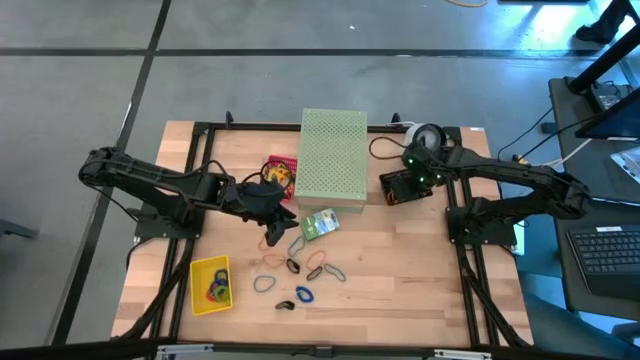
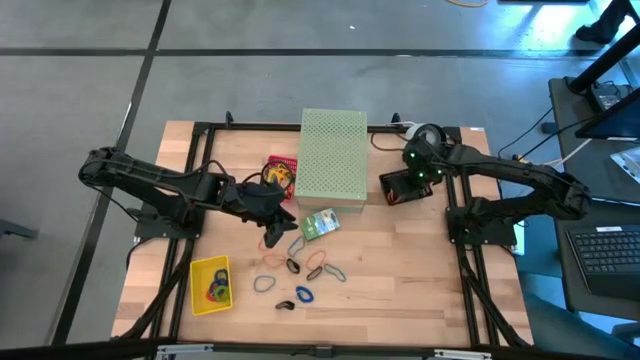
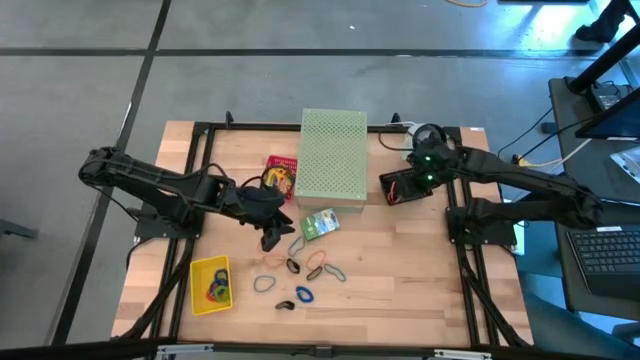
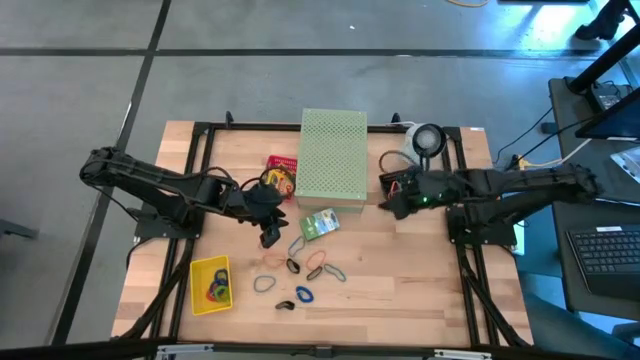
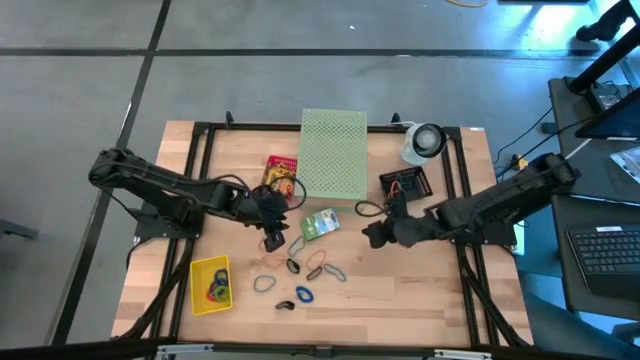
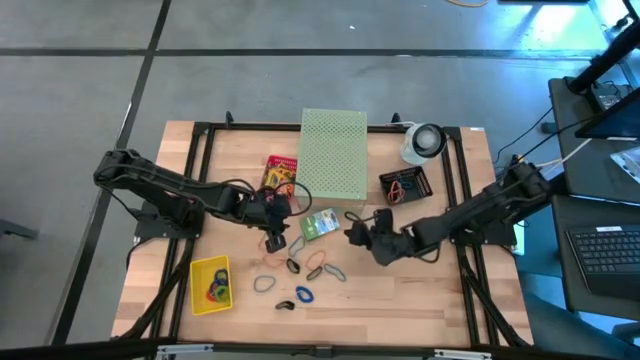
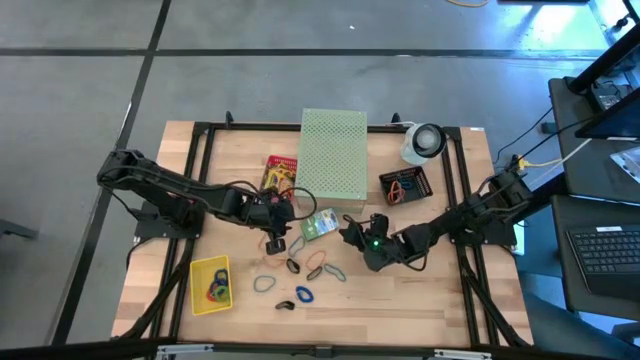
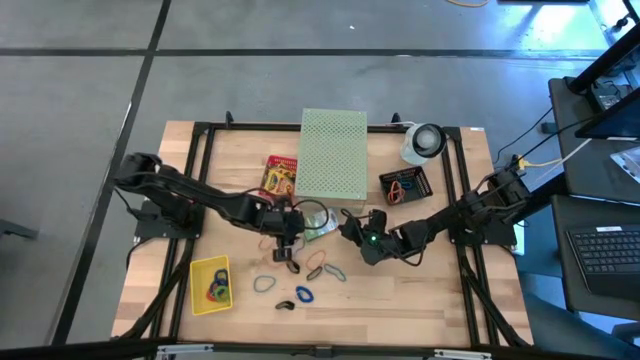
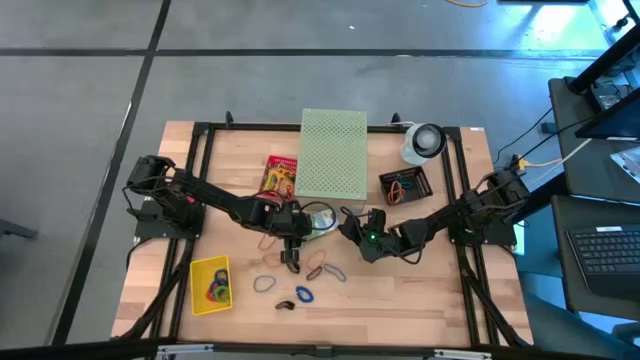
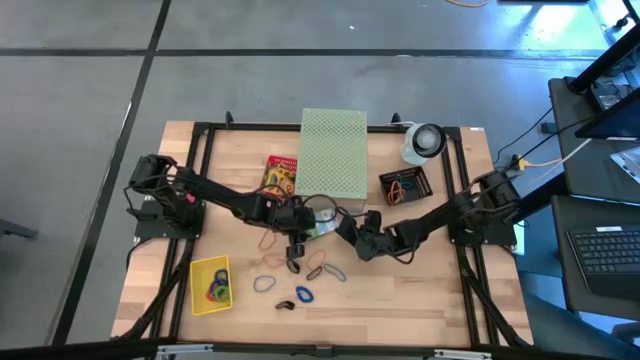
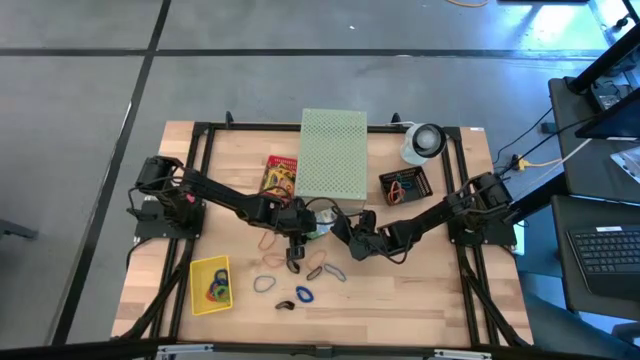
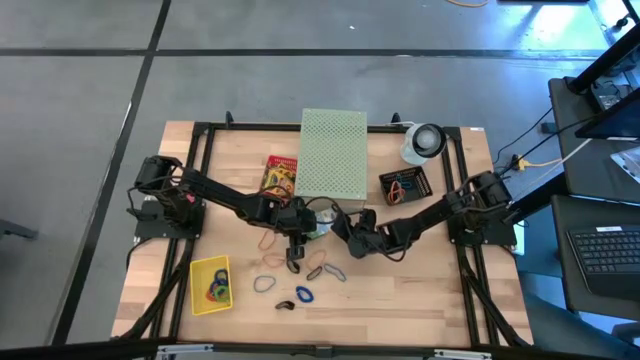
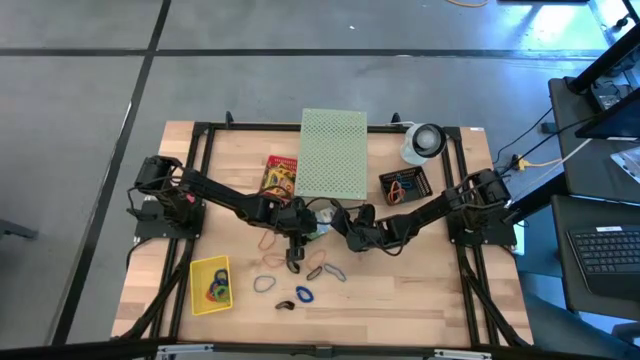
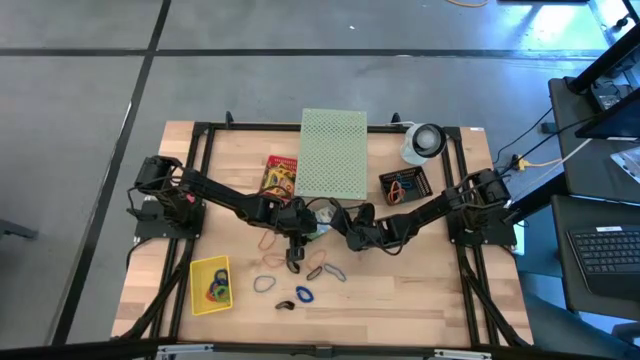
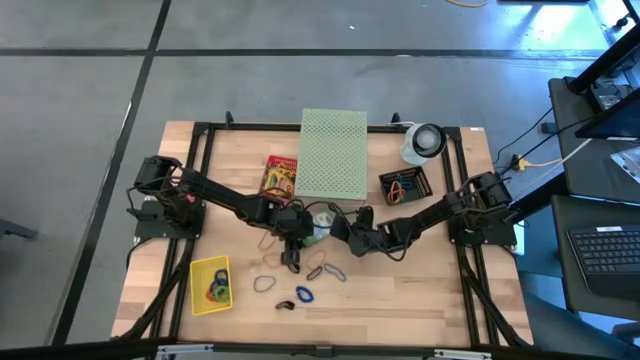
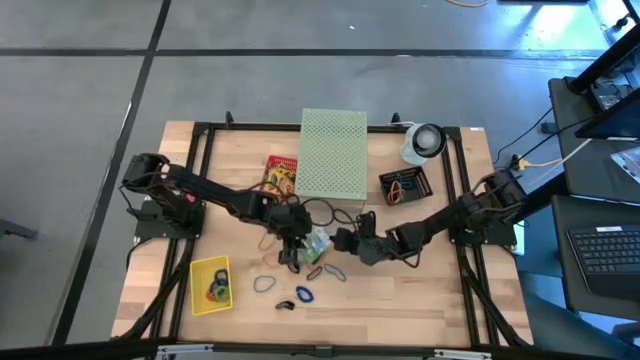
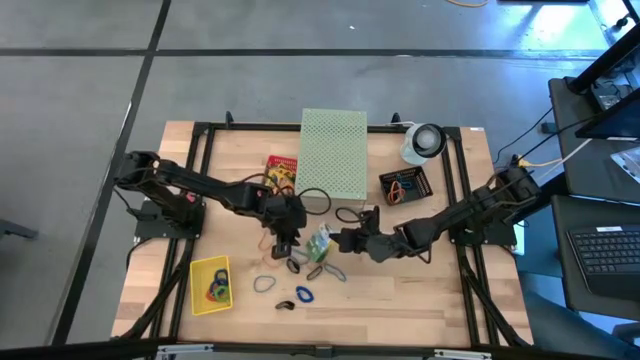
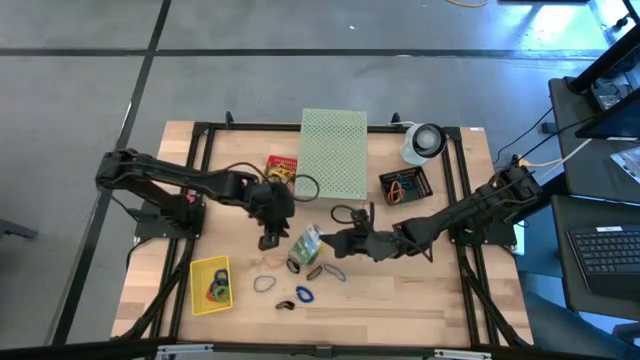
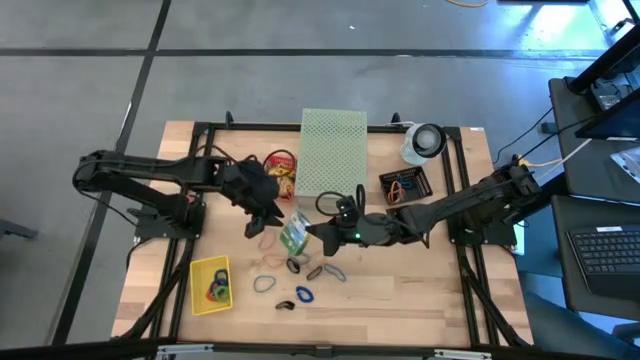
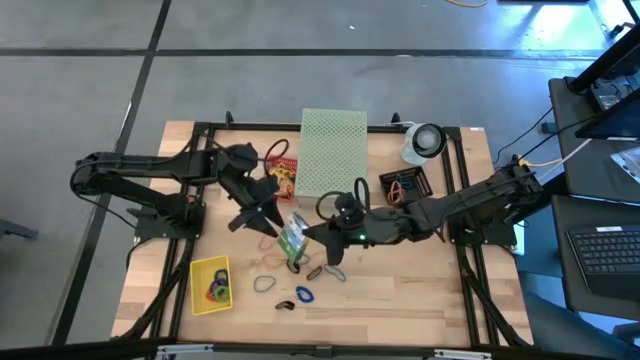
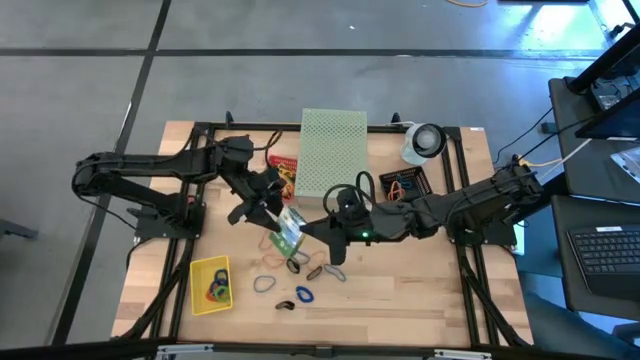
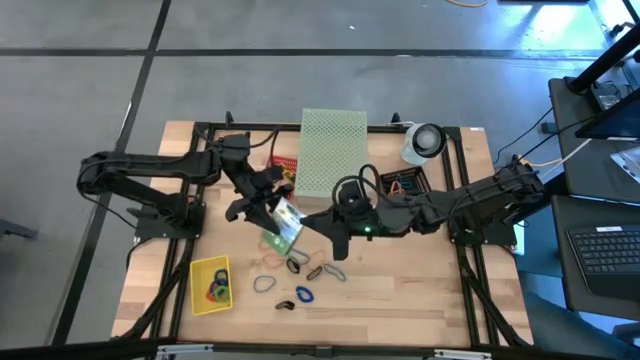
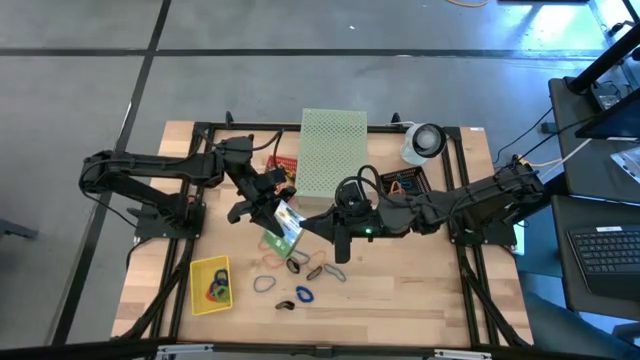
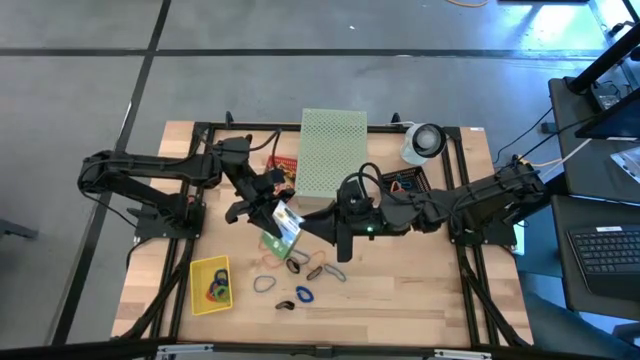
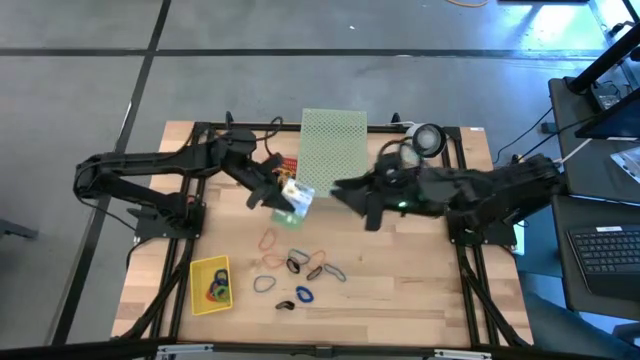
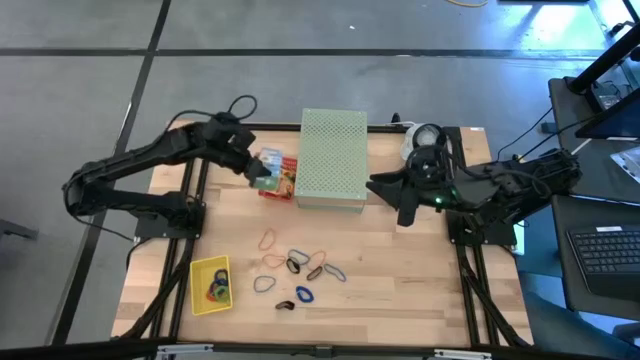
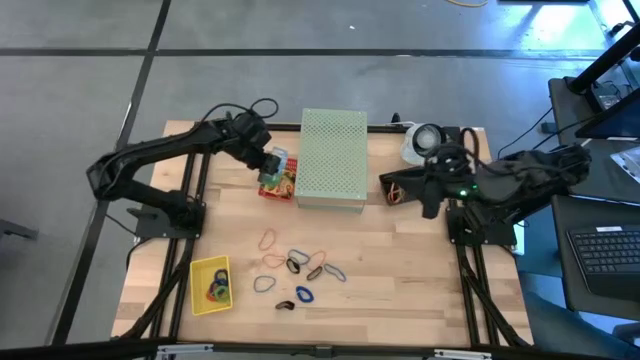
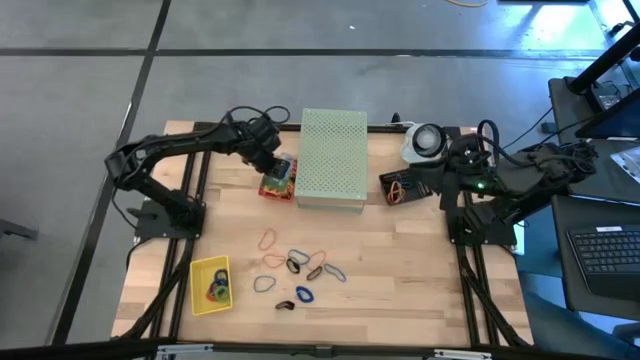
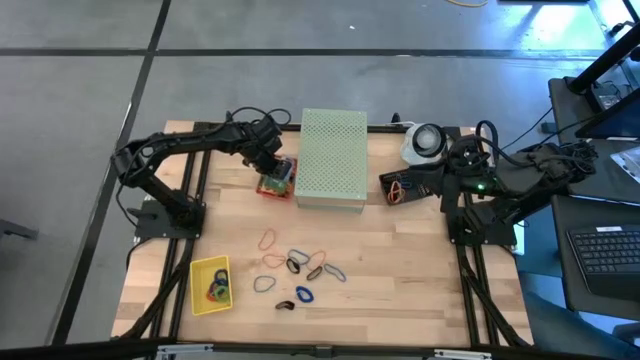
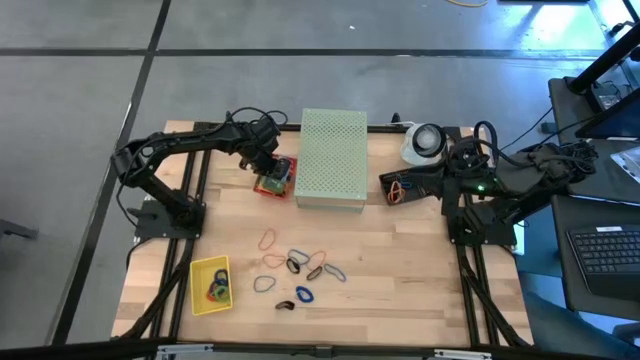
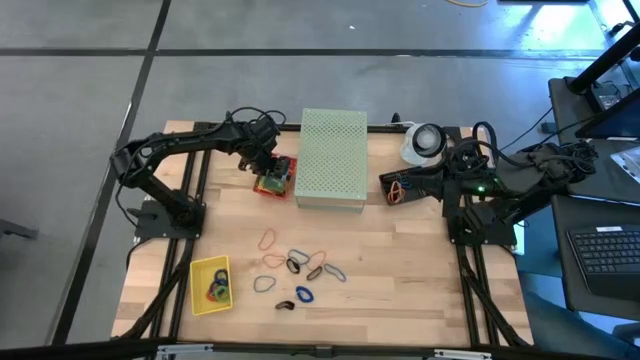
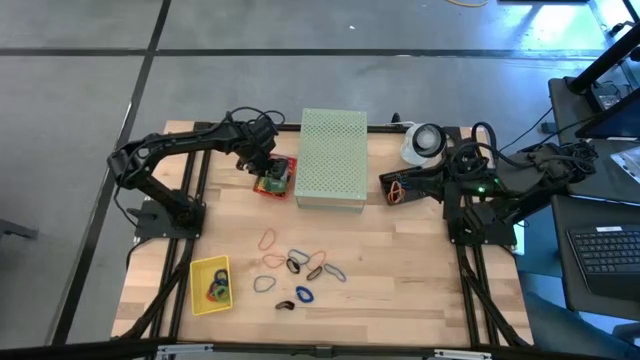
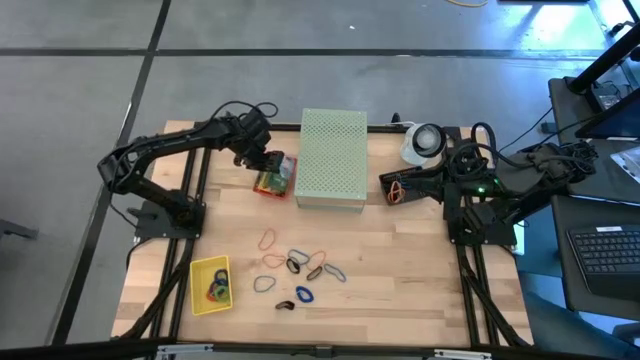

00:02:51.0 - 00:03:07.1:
Task: Pick & Place Office Desk Supplies
Put the crayola box into the orange bin
